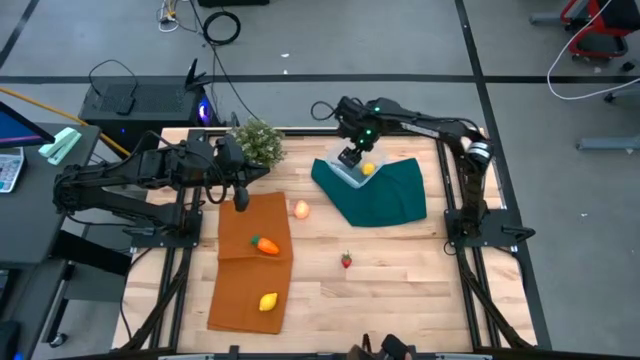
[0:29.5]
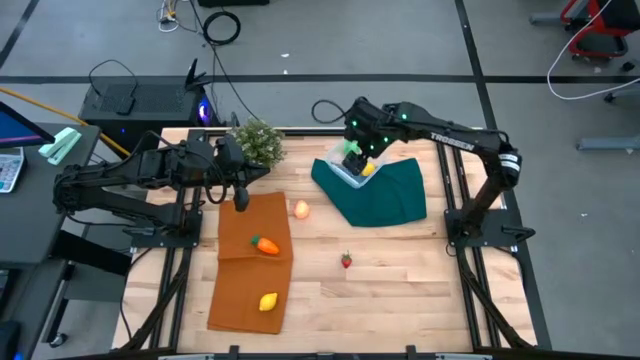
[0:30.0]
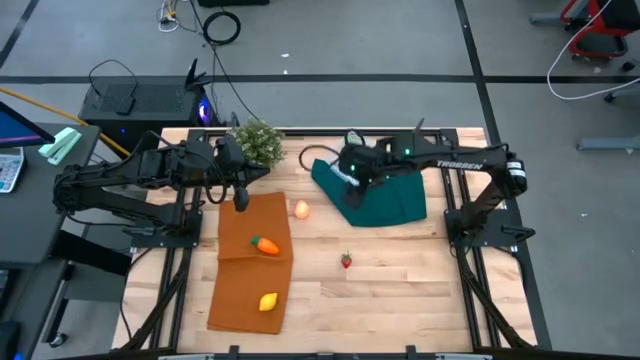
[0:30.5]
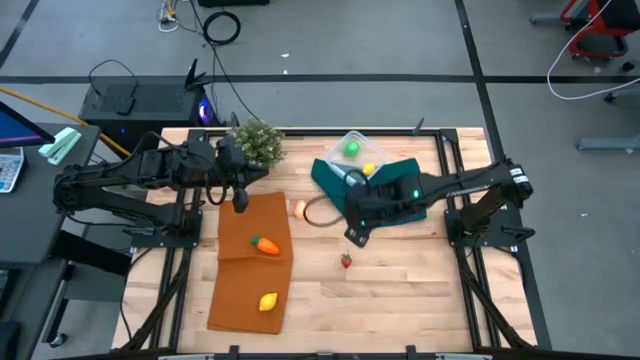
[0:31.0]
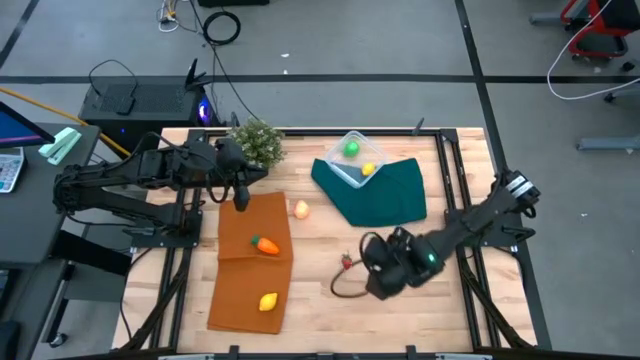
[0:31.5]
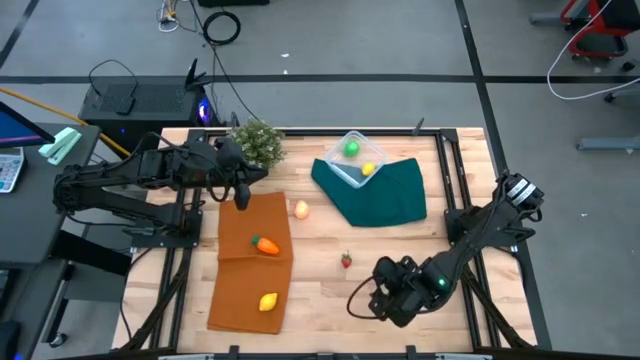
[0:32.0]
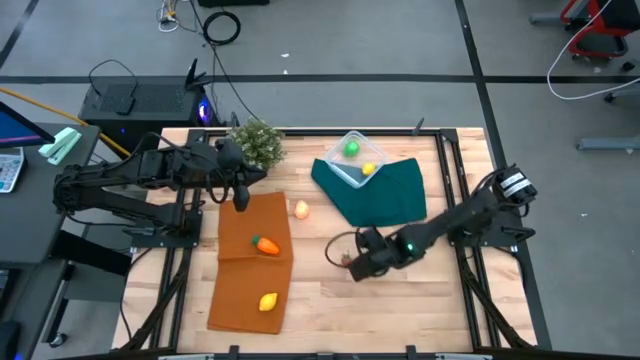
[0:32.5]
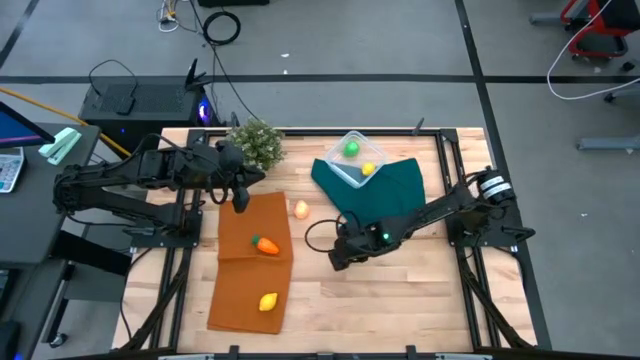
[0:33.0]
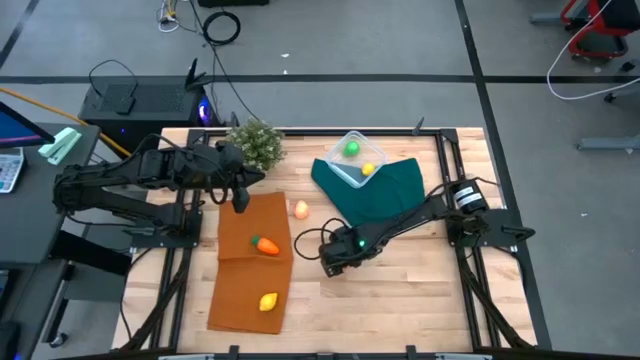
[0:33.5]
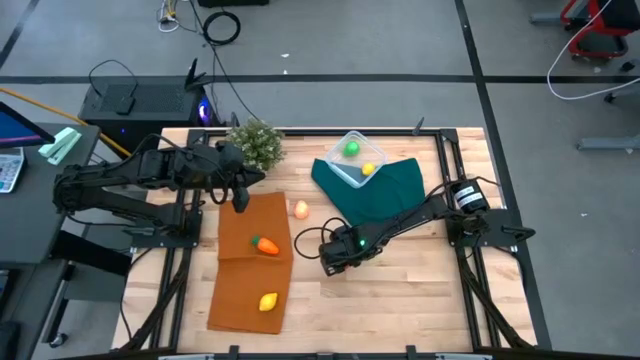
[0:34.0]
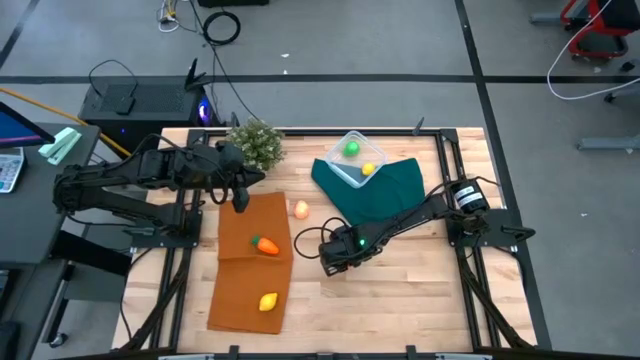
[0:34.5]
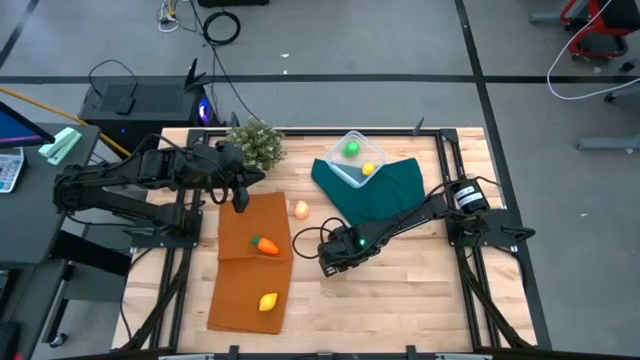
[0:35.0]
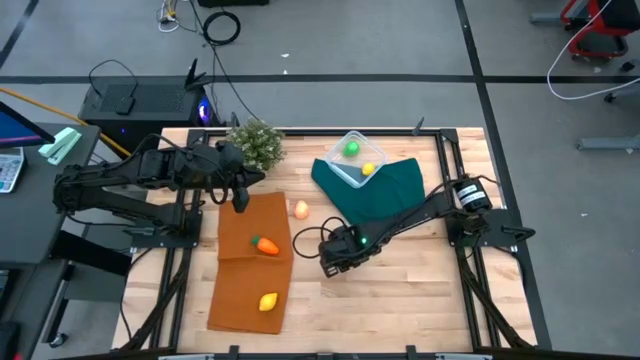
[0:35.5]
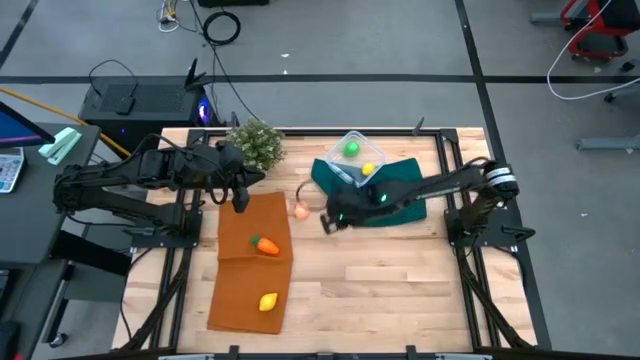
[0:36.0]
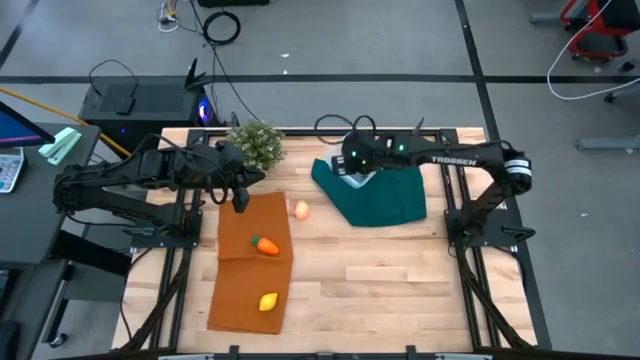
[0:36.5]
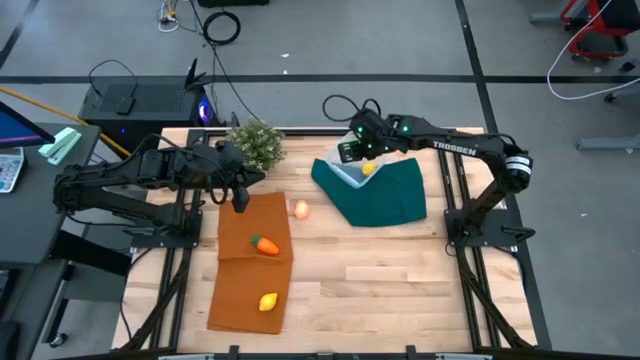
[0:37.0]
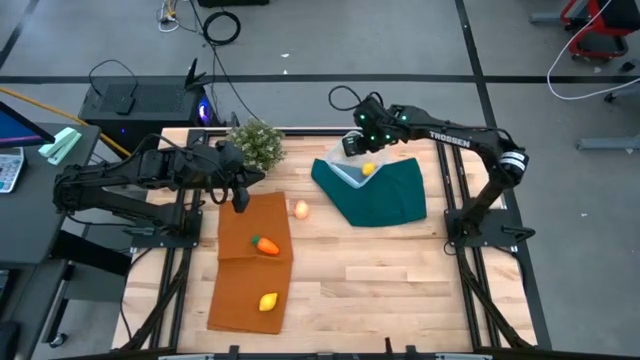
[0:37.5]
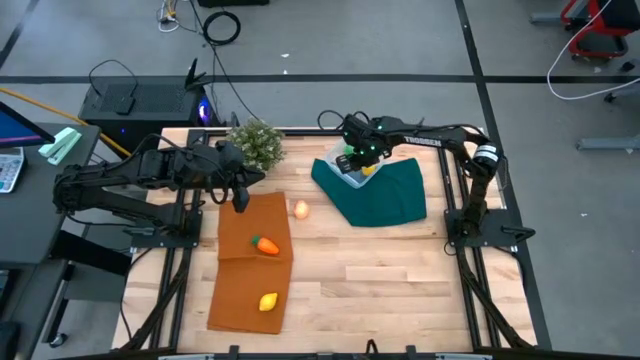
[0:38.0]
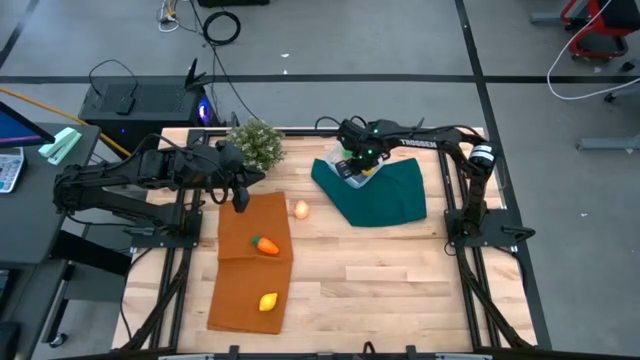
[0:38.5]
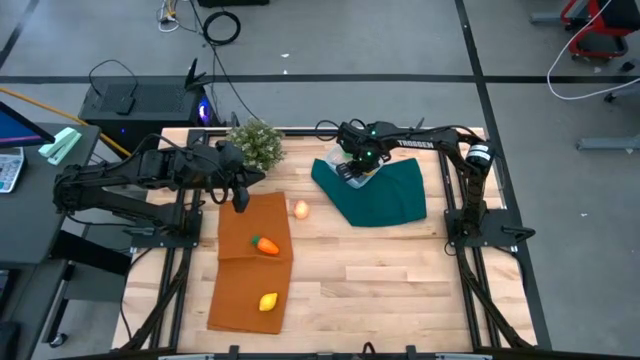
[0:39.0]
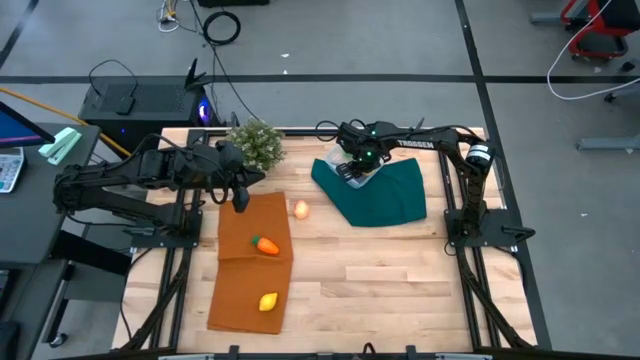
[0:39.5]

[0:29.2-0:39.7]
Task: Pick and placing Produce into tupperware
Put the strawberry into the transparent bin

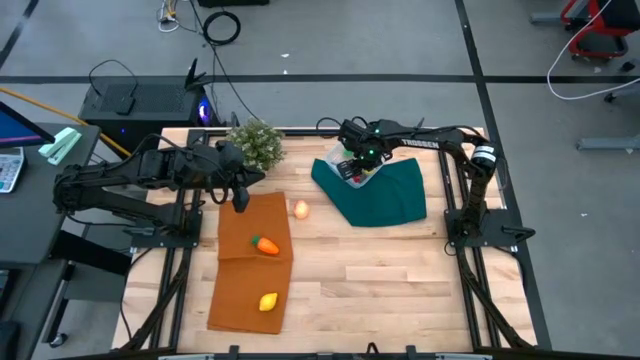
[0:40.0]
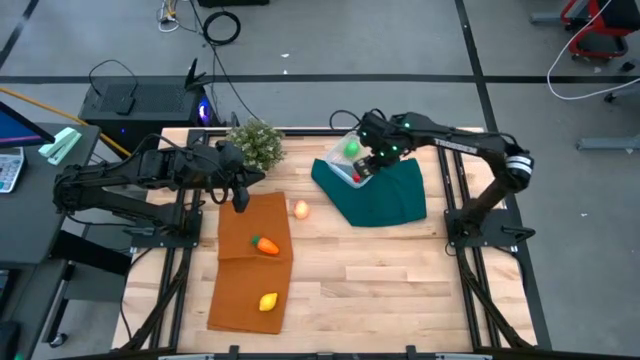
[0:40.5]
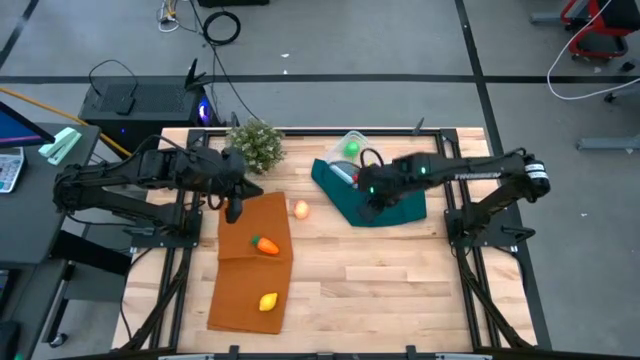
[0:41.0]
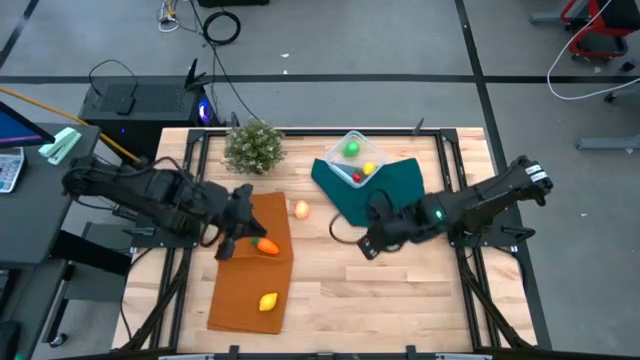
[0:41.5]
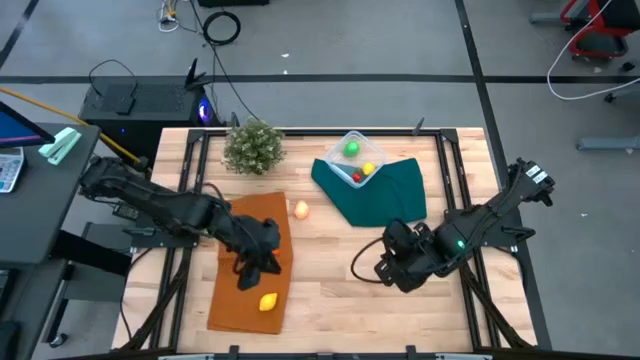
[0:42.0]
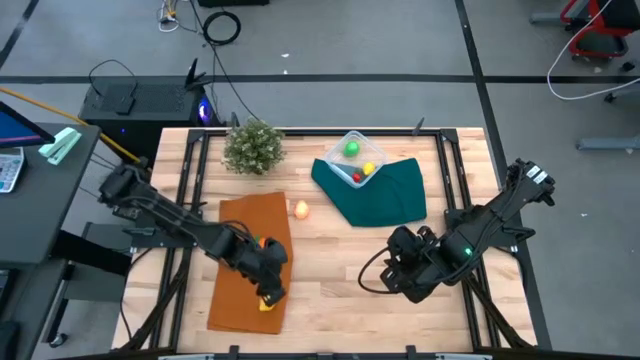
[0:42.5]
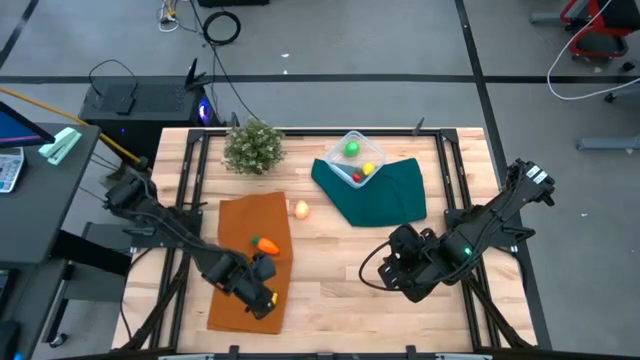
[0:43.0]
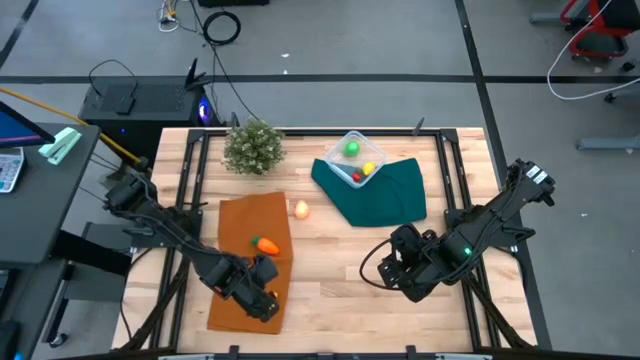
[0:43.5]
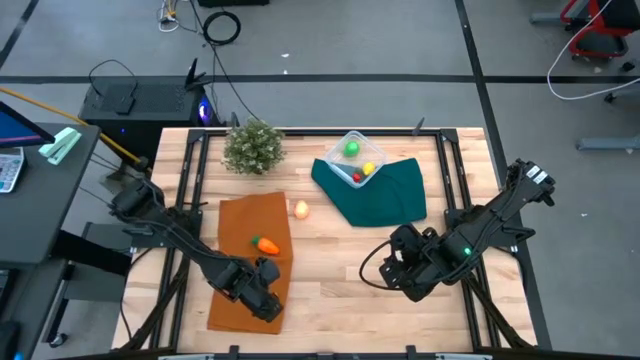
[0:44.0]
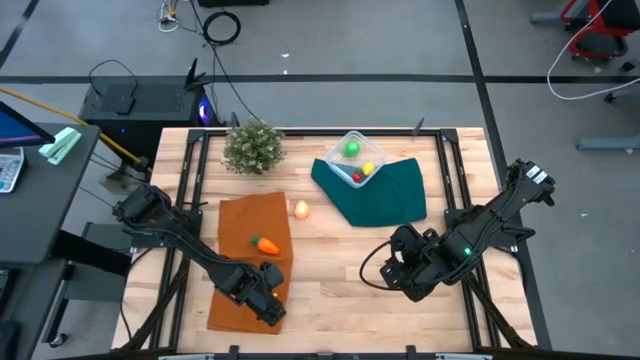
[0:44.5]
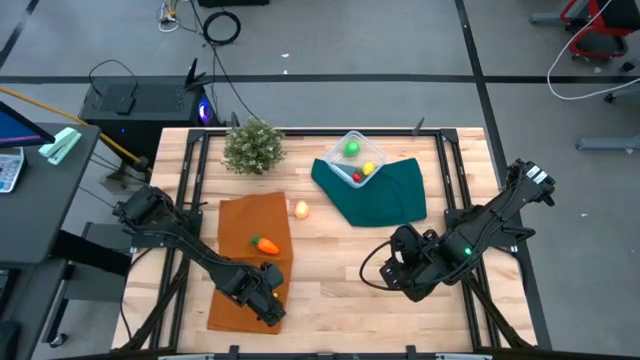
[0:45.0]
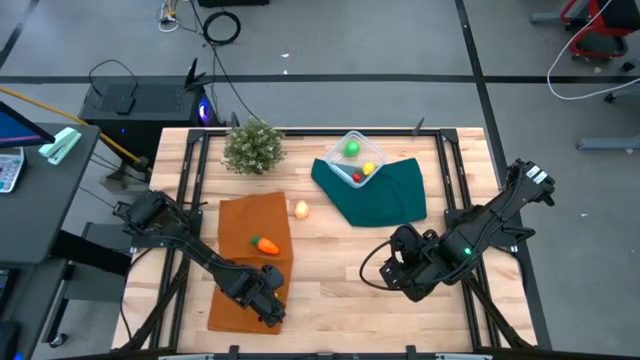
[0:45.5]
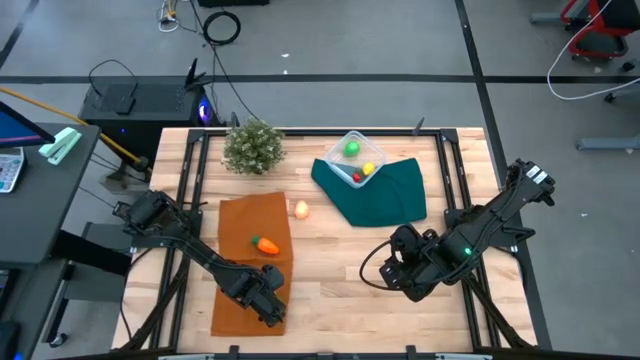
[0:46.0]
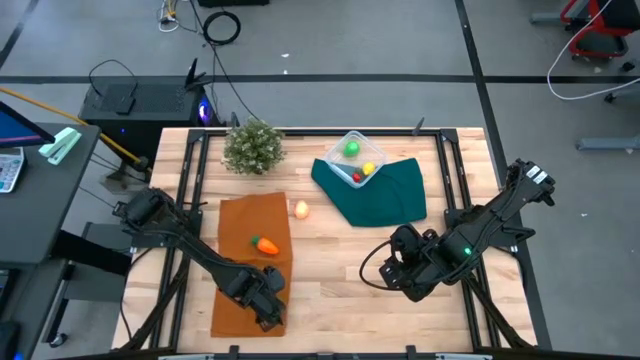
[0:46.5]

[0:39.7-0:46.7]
Put the lemon into the transparent bin

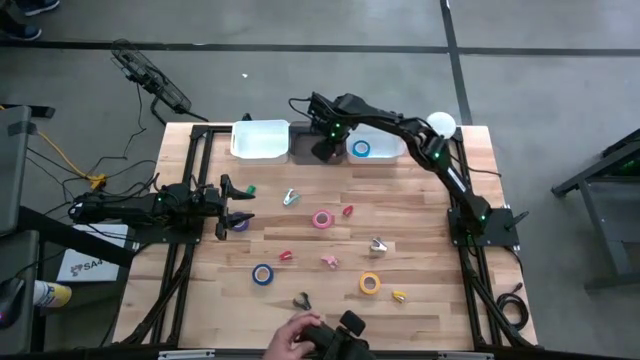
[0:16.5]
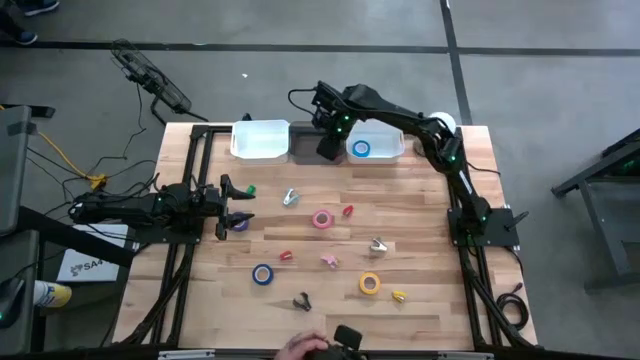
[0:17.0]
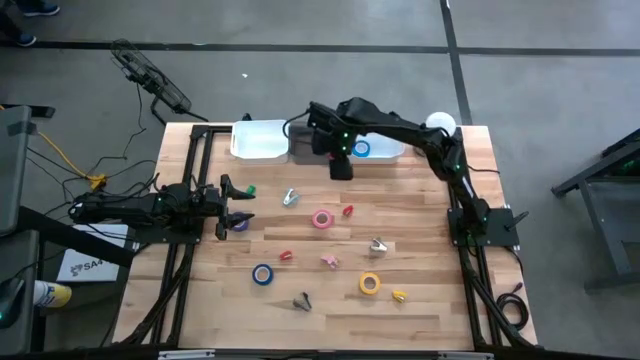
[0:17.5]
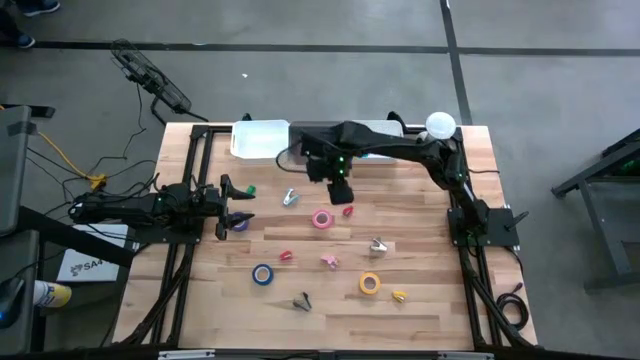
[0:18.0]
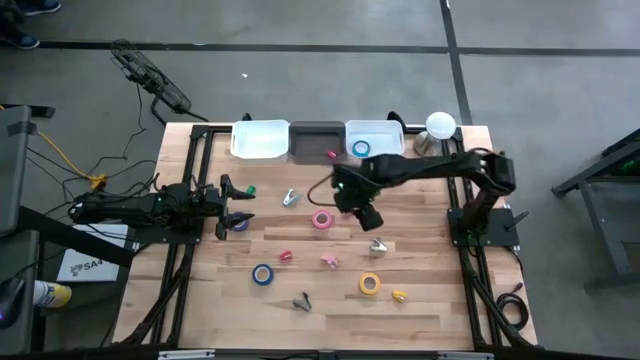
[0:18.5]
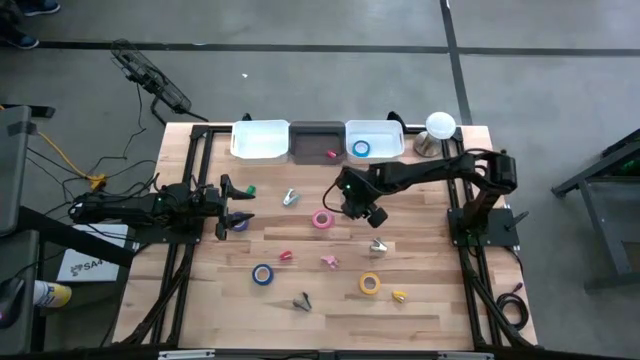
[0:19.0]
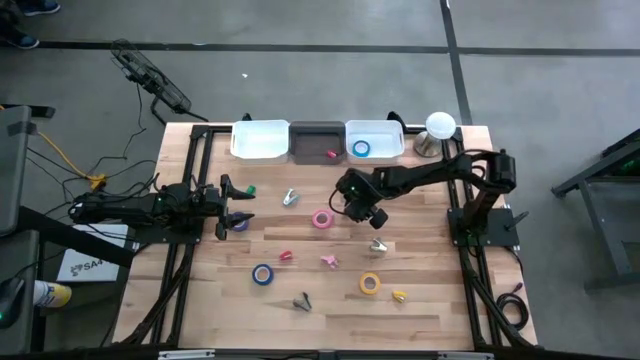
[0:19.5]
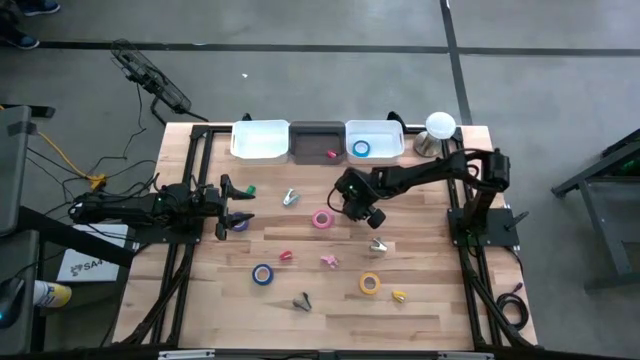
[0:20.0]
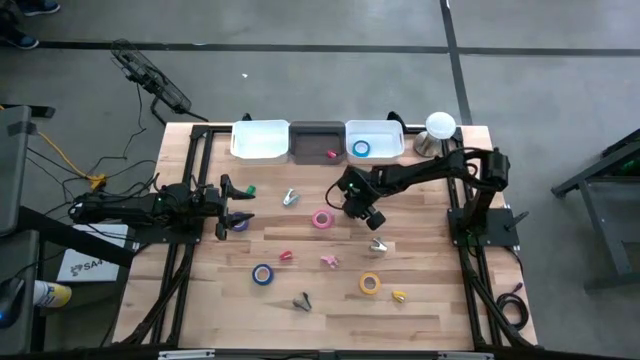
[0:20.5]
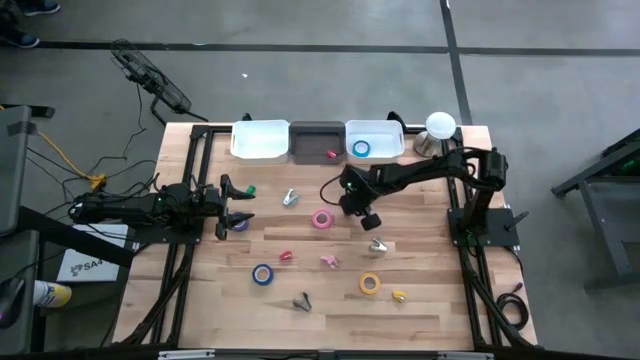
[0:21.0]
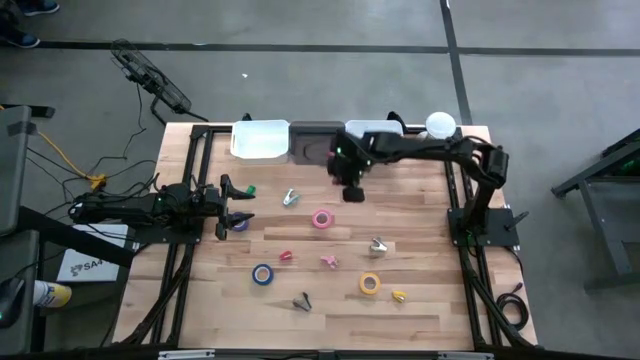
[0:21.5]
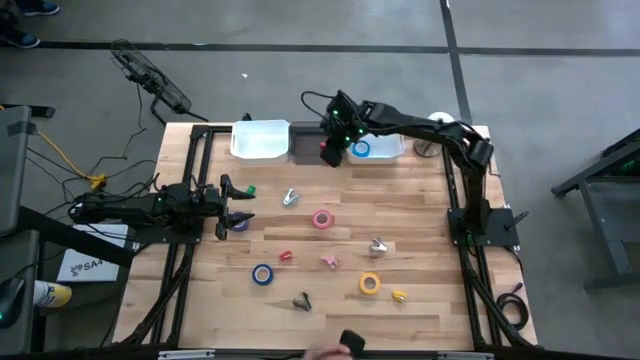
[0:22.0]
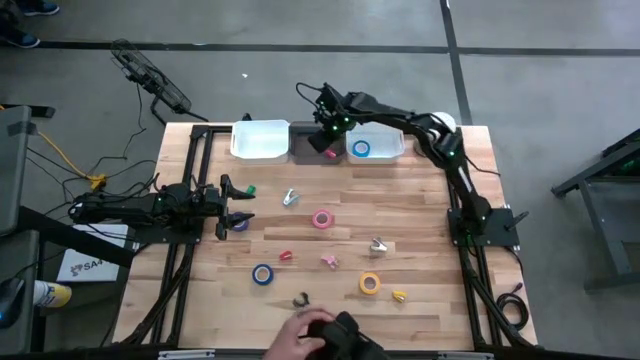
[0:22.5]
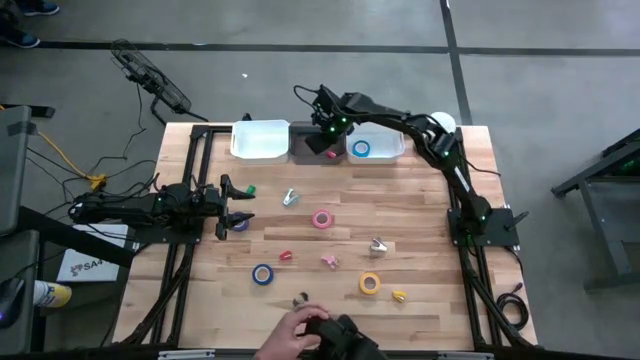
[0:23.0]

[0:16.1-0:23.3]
Task: Pick and place Stapler, Stapler remover, tape
Put the top red stapler into the black transparent bin
